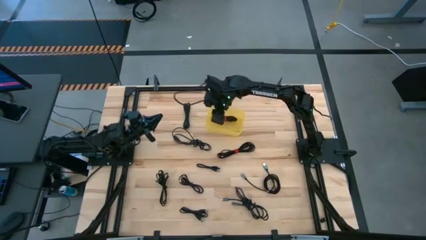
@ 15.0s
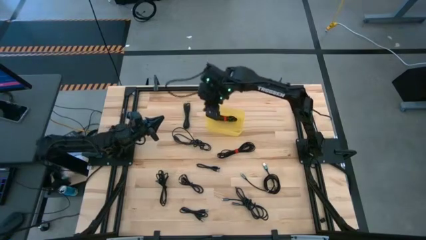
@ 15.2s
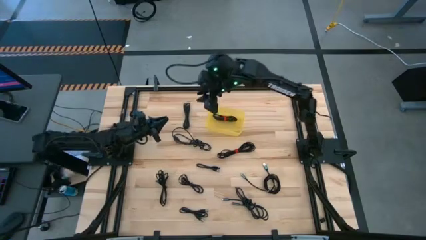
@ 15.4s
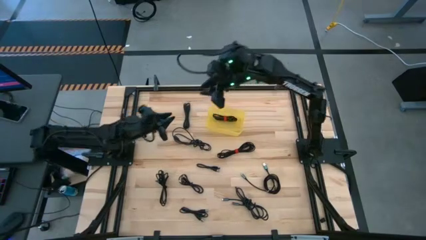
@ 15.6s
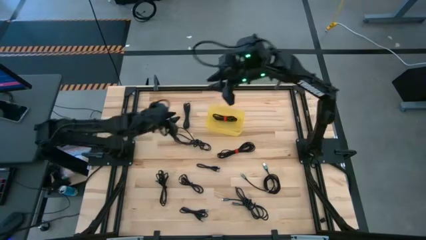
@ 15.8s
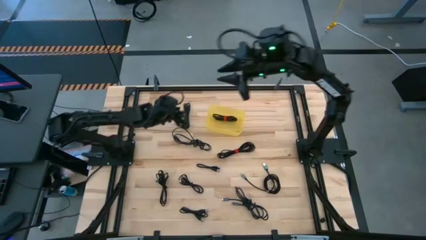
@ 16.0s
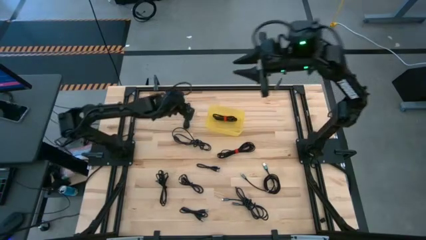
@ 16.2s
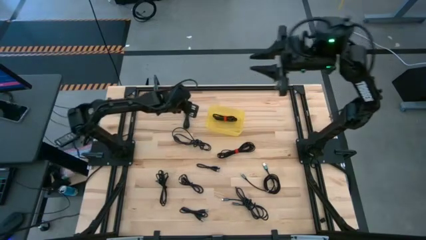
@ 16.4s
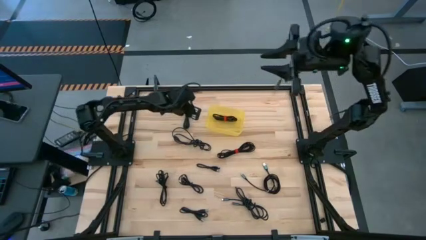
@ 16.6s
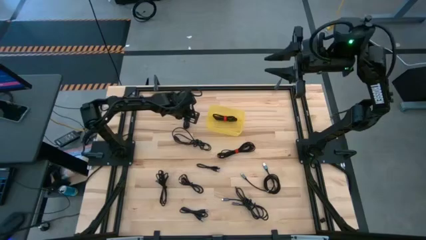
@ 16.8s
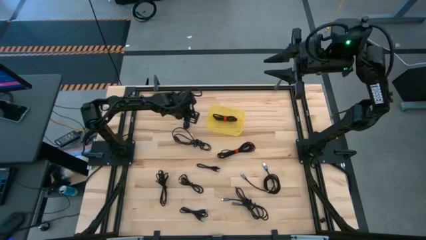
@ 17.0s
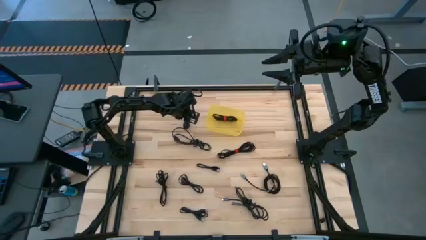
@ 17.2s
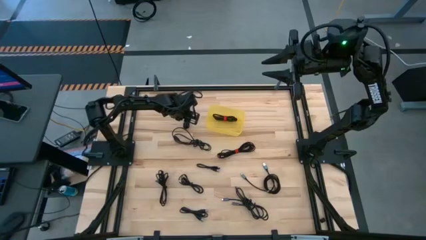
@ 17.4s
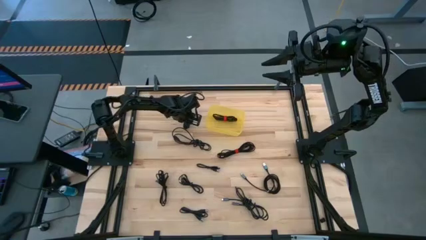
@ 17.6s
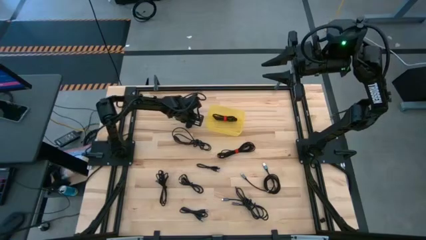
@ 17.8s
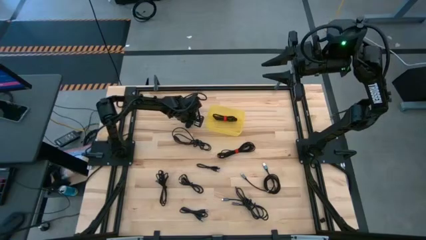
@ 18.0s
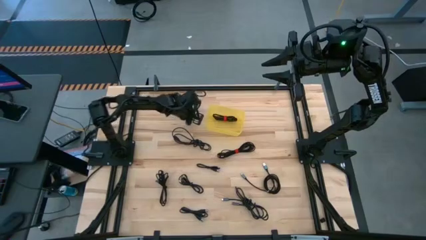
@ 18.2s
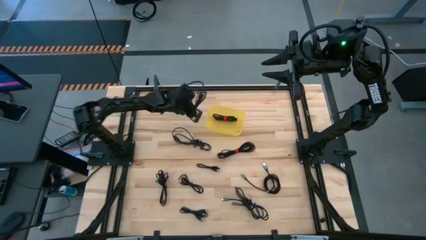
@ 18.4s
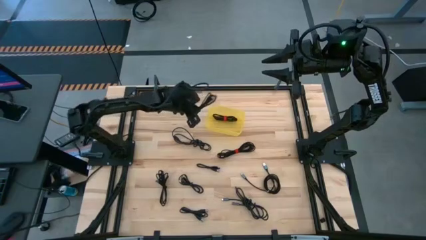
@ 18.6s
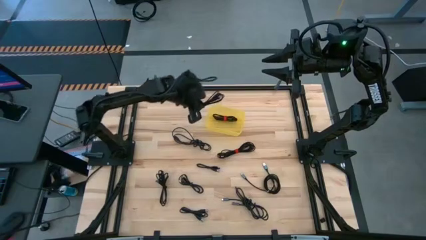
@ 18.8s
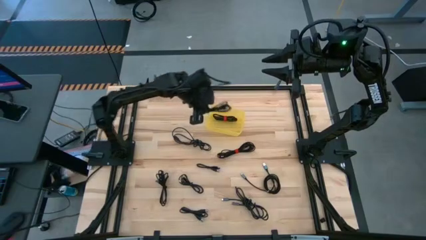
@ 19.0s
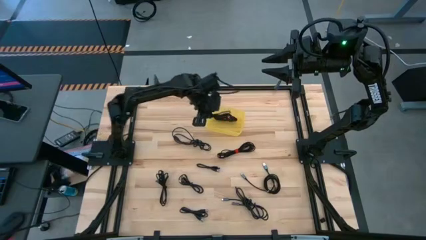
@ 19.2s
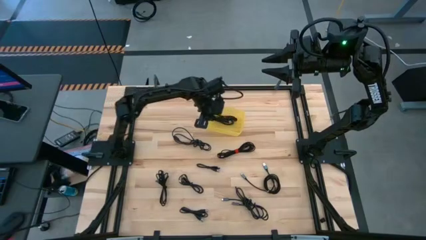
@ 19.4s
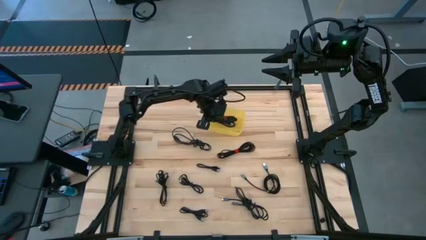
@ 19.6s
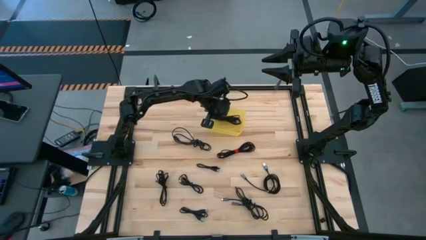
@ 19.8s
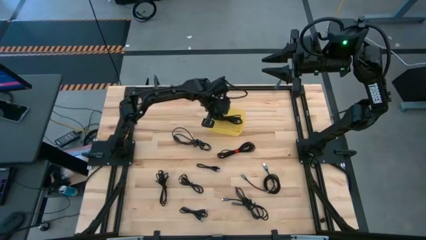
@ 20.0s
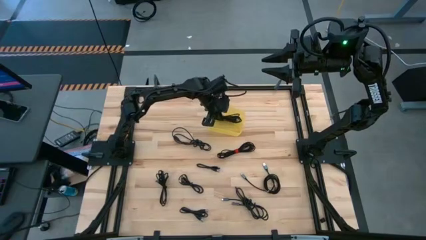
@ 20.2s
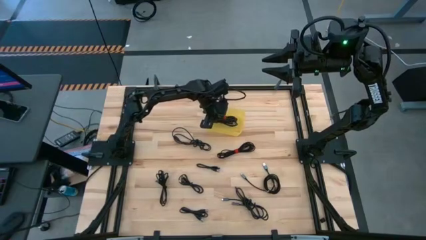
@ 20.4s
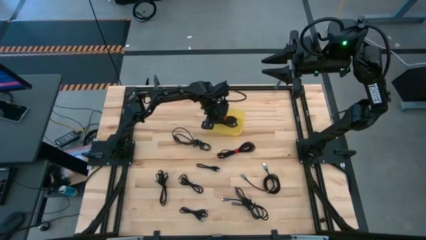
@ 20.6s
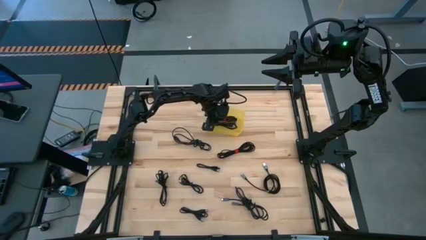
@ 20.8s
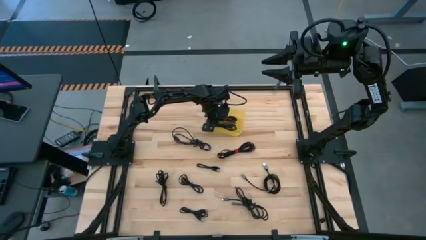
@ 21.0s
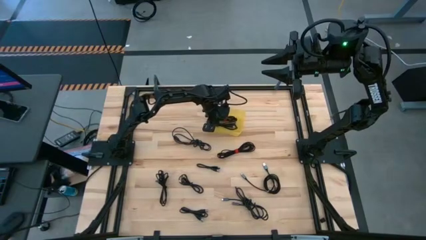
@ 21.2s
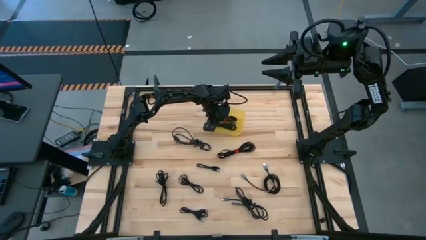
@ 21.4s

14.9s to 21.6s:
Task: Pick and place USB-C Cables
Put the black charger cable into the yellow bin

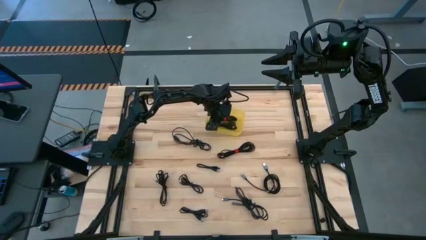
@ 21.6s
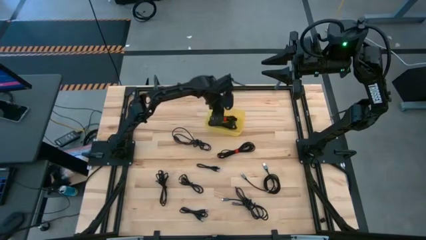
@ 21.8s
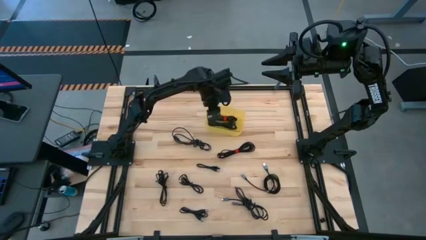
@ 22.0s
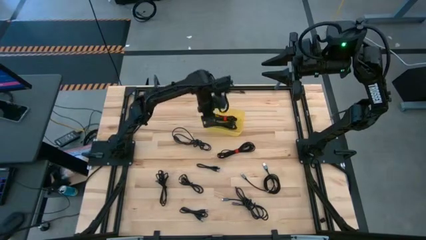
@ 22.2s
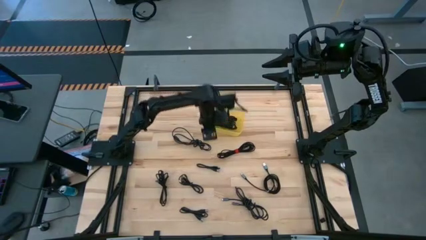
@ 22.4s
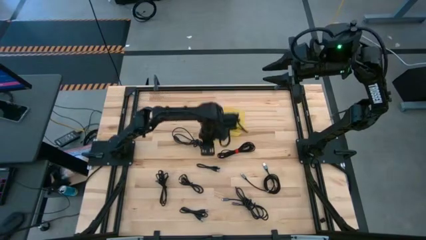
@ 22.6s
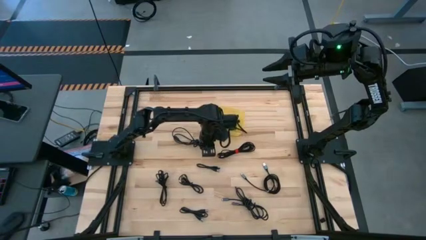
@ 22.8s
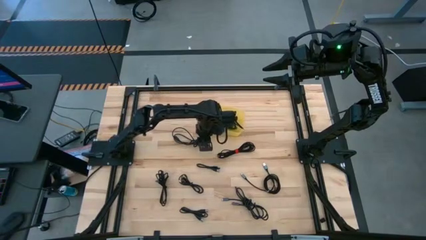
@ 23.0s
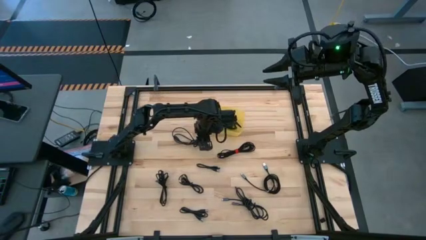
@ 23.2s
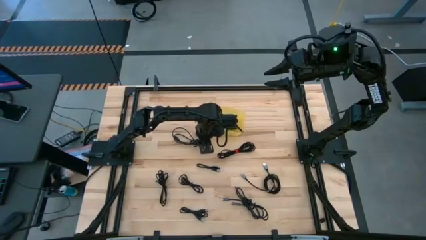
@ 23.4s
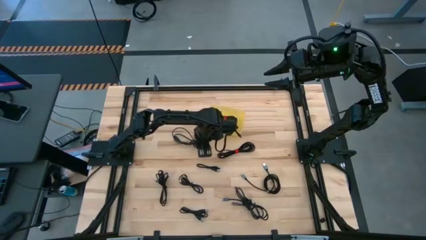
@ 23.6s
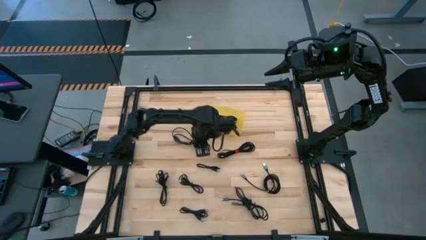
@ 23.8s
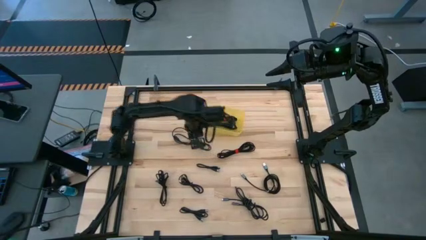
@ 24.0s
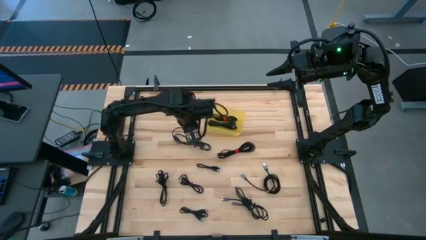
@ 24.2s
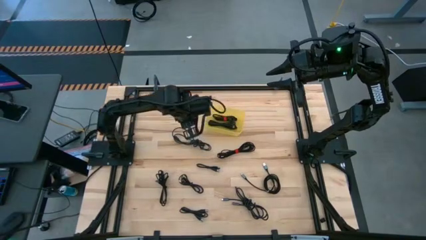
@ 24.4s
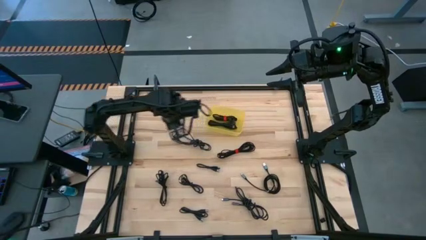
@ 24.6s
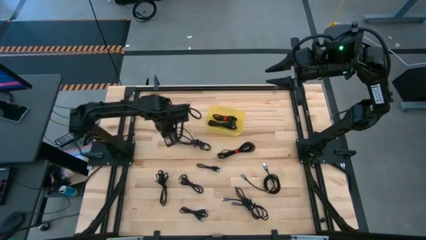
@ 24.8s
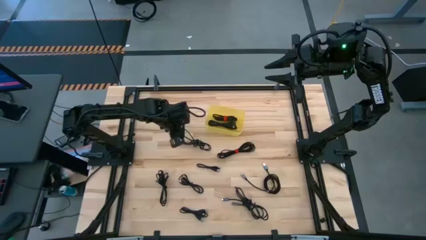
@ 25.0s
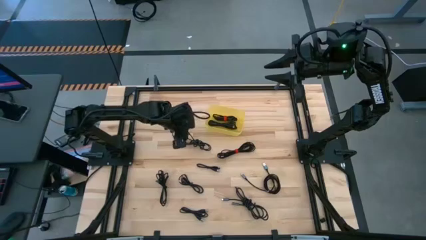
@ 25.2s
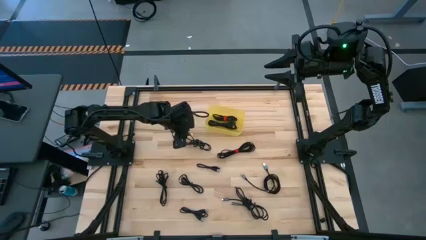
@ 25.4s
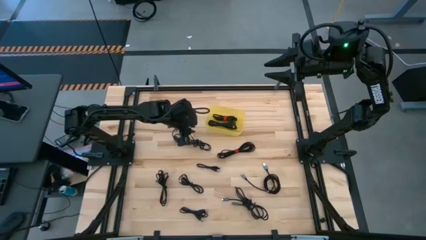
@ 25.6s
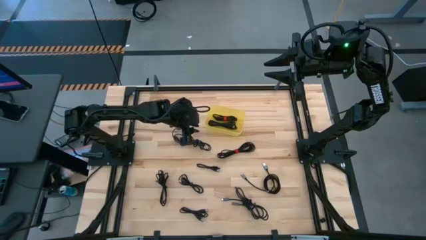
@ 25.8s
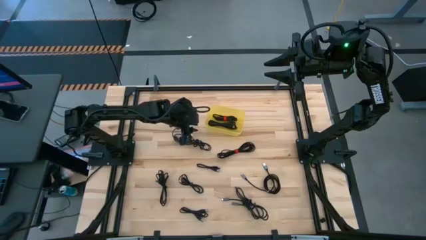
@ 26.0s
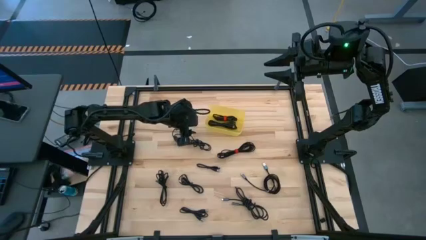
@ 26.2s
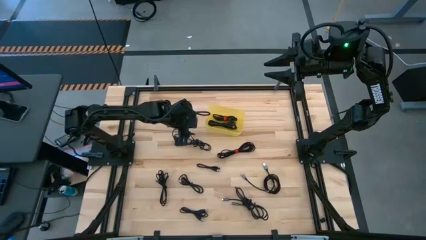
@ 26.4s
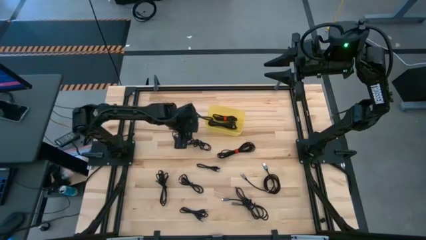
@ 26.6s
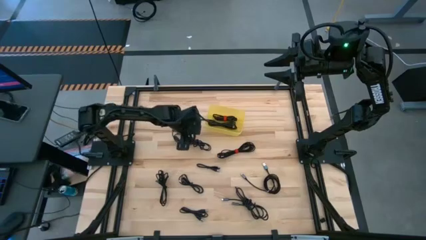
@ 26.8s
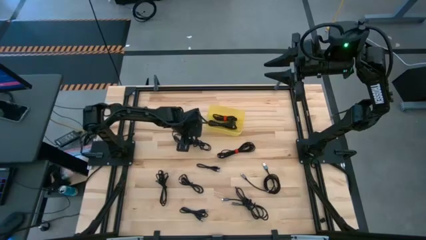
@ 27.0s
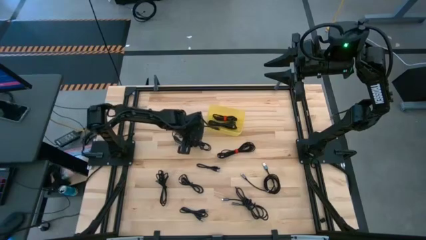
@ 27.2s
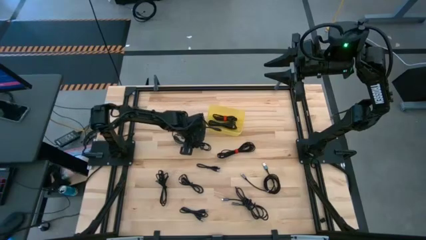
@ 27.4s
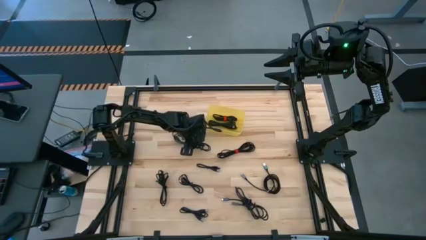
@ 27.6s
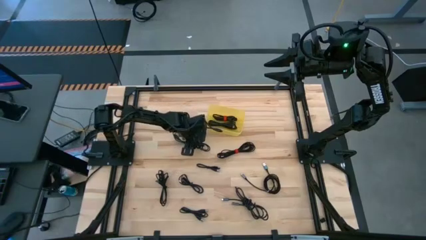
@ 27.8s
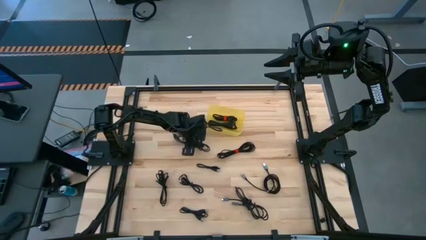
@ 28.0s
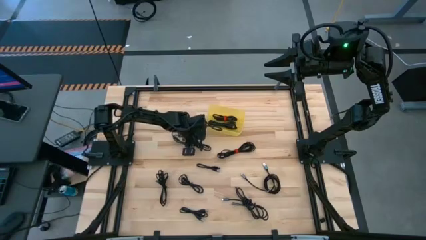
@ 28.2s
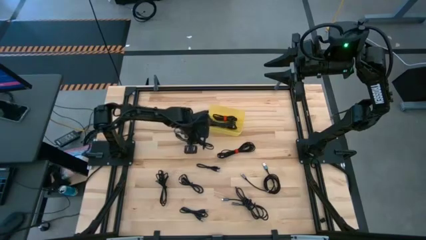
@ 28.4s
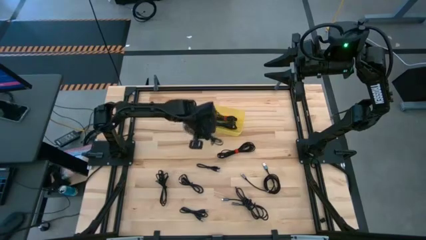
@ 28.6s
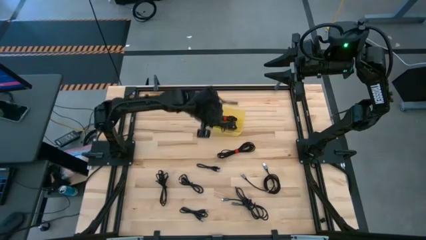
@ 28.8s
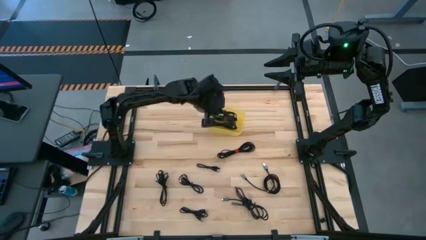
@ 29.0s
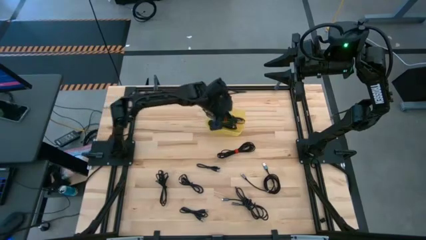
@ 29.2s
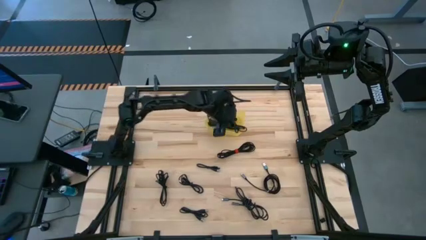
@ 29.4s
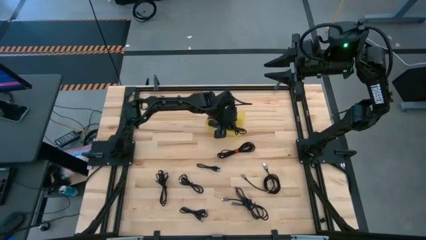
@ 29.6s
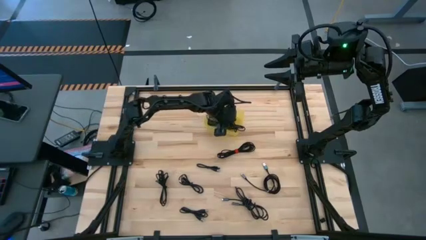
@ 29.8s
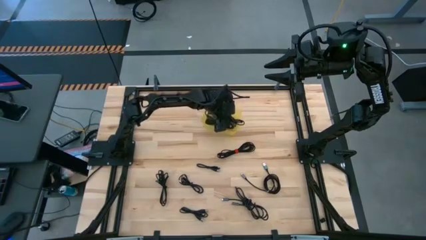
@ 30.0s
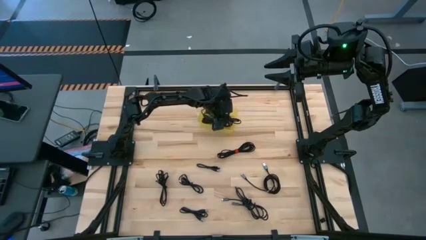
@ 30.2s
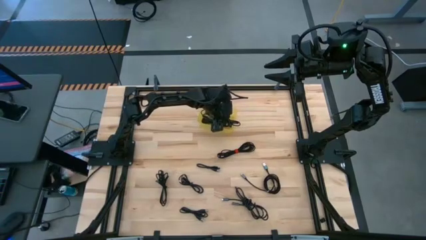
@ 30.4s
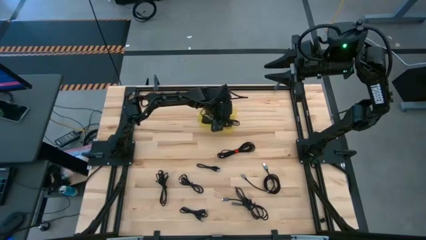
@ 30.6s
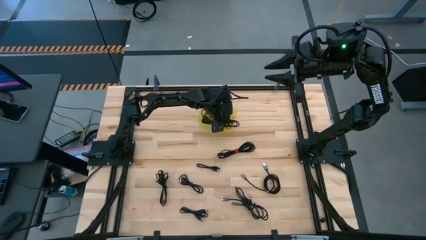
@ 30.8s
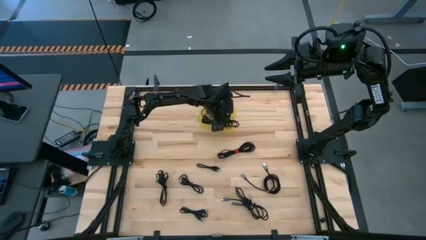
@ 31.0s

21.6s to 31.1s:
Put the black charger cable into the yellow bin
